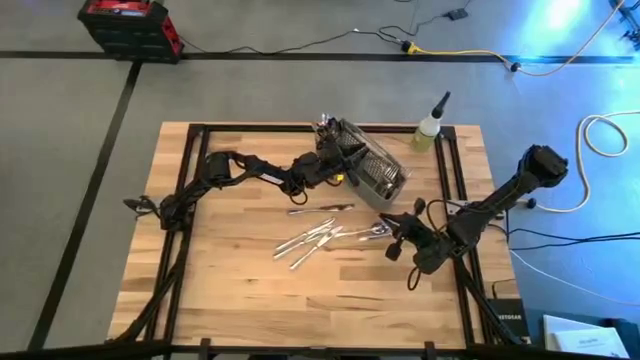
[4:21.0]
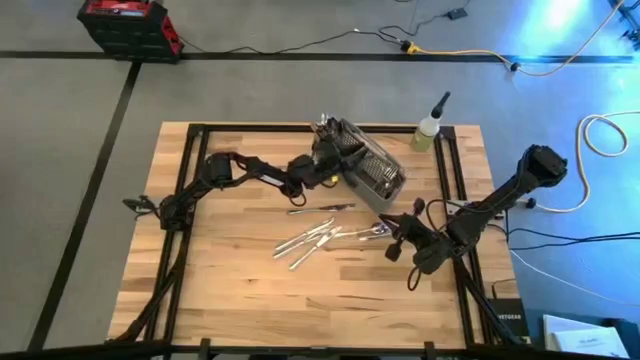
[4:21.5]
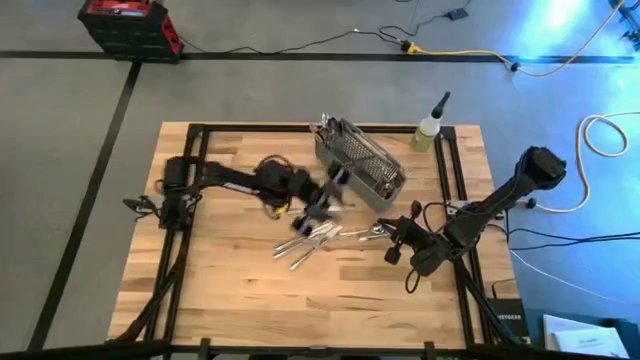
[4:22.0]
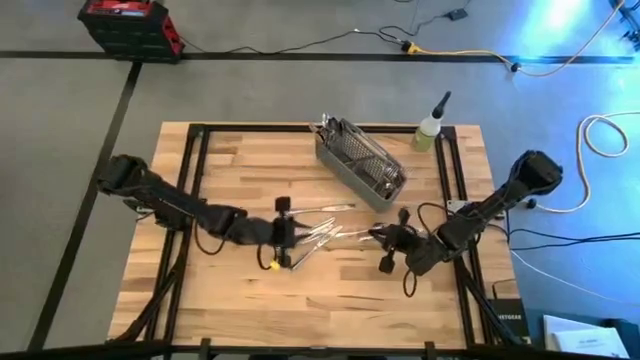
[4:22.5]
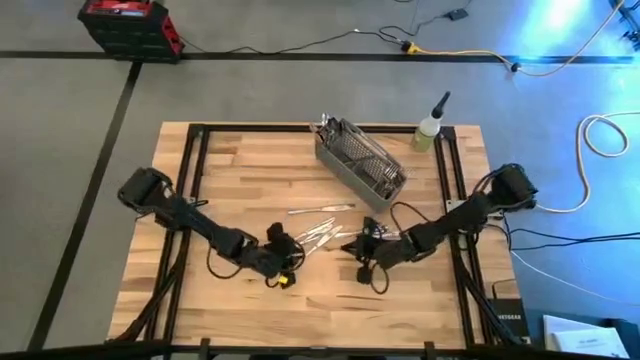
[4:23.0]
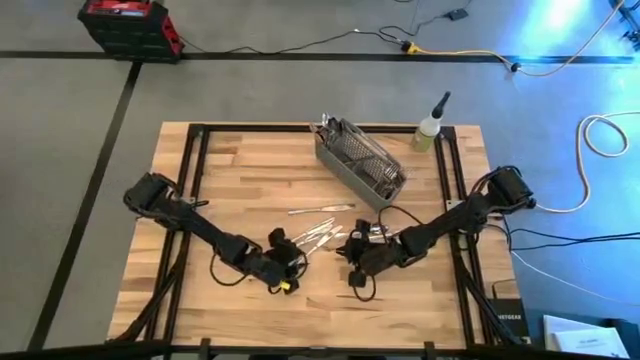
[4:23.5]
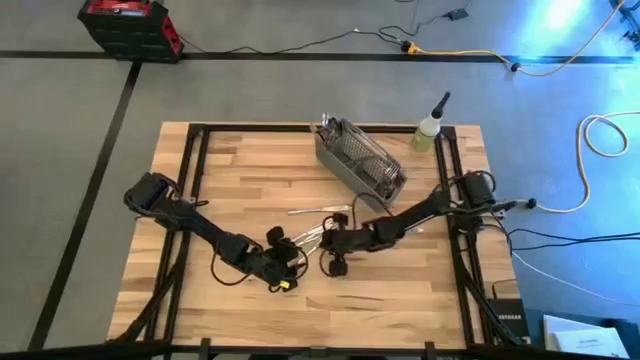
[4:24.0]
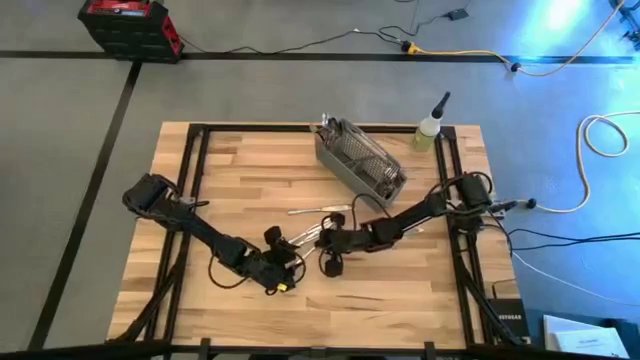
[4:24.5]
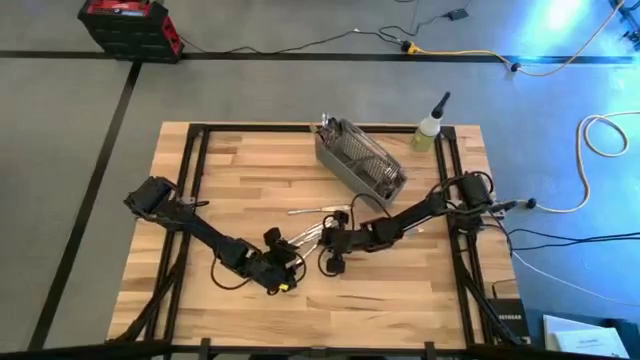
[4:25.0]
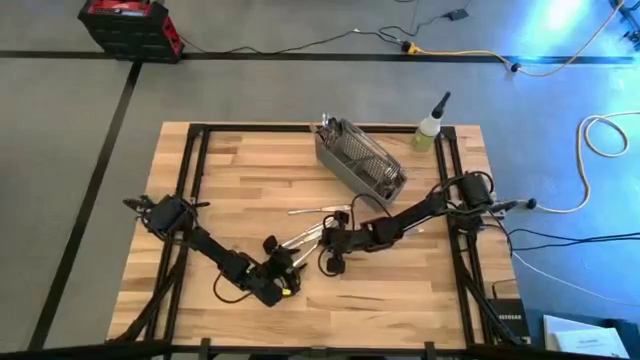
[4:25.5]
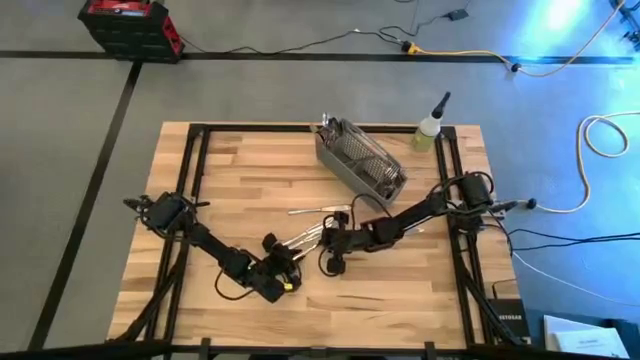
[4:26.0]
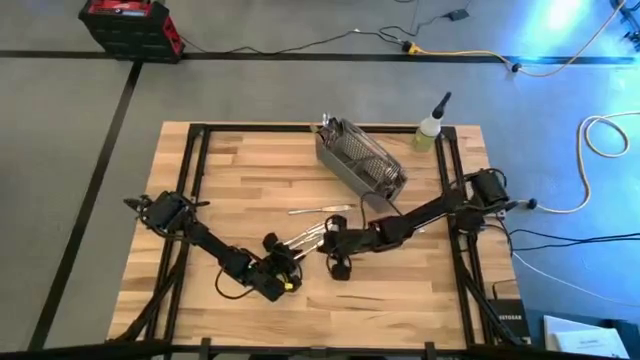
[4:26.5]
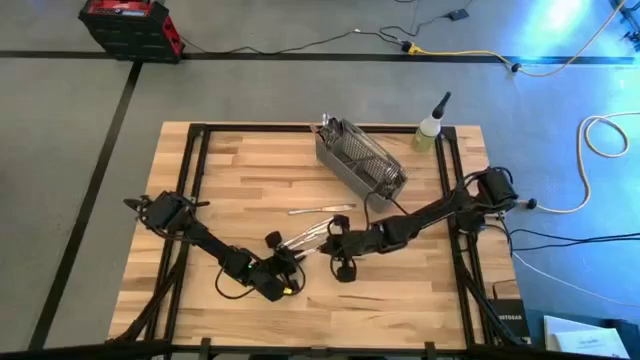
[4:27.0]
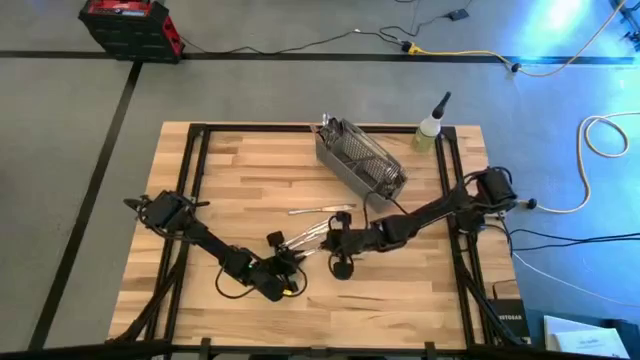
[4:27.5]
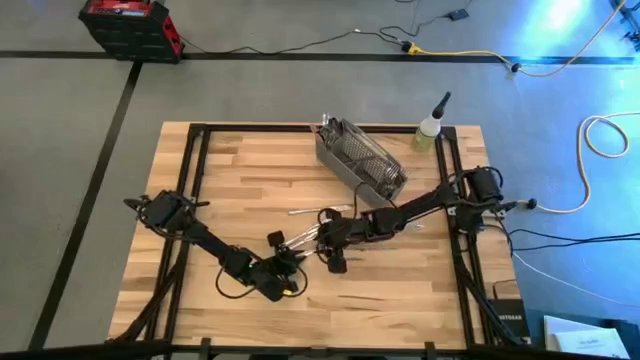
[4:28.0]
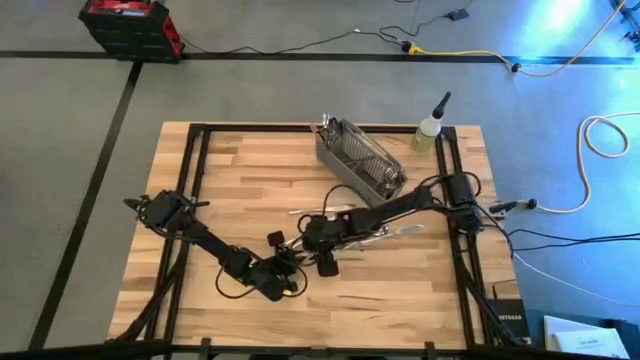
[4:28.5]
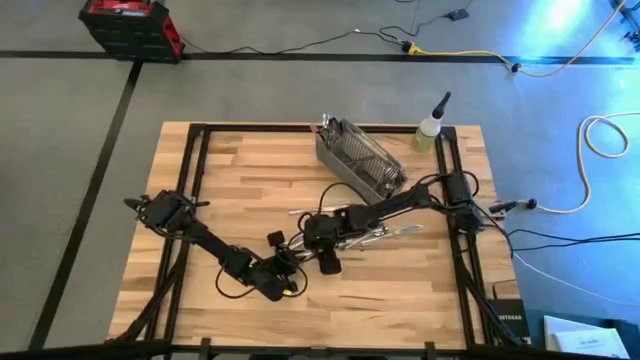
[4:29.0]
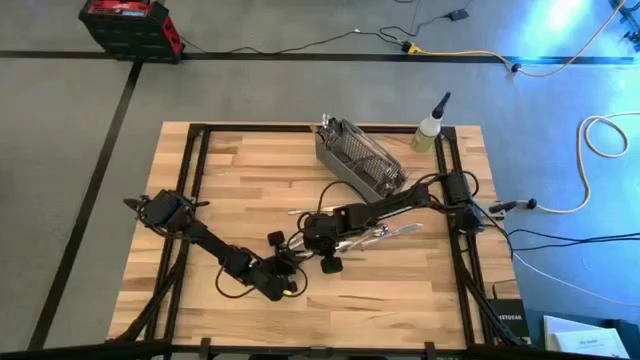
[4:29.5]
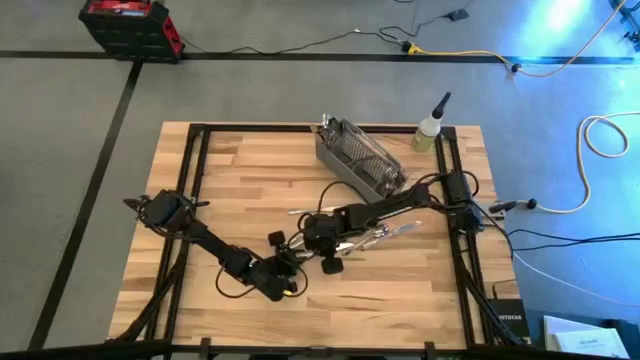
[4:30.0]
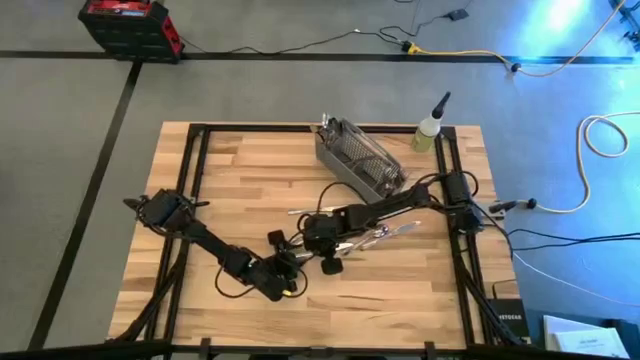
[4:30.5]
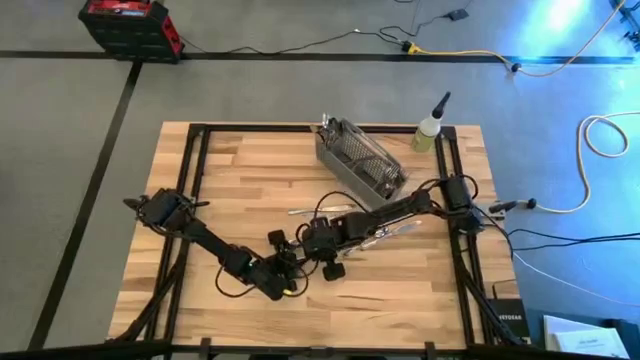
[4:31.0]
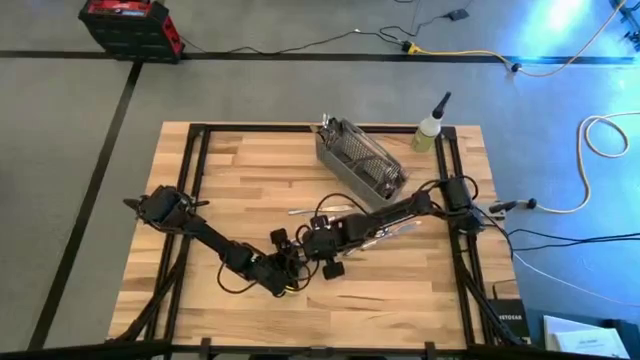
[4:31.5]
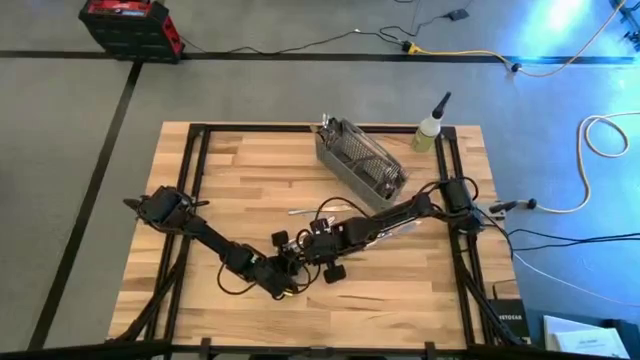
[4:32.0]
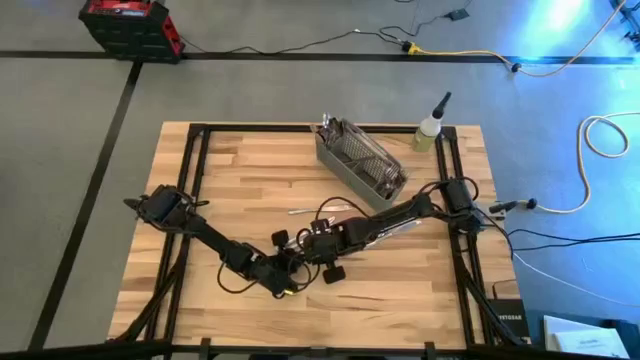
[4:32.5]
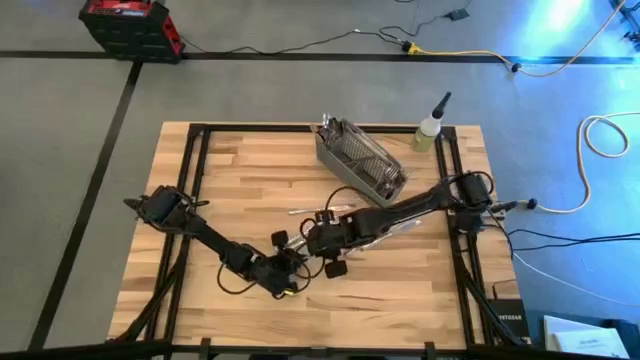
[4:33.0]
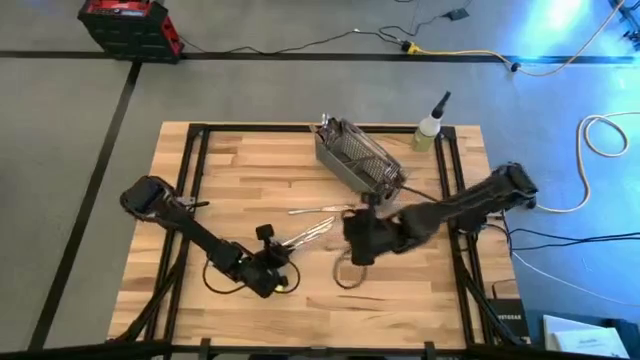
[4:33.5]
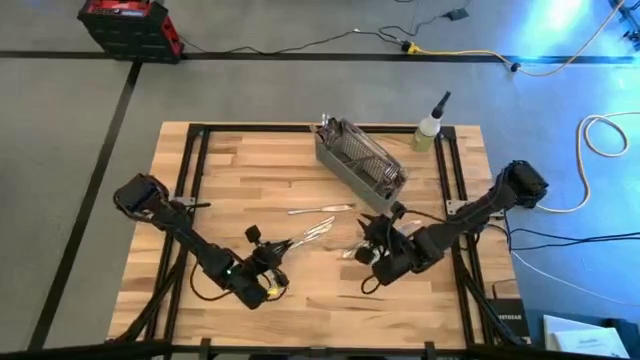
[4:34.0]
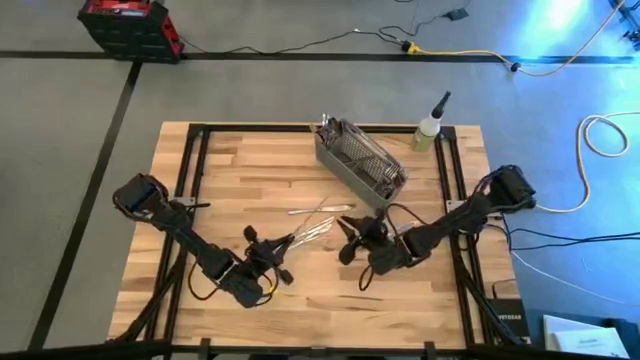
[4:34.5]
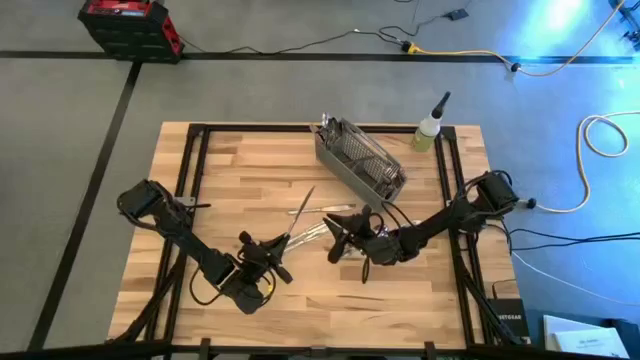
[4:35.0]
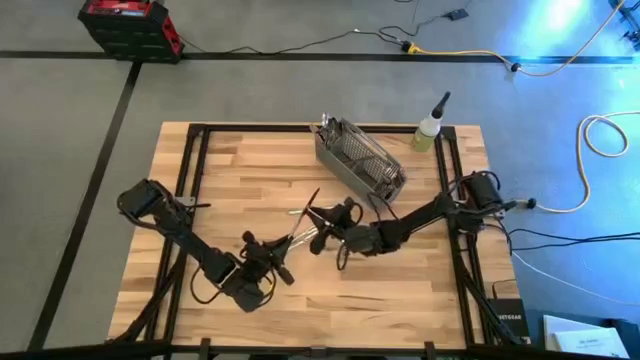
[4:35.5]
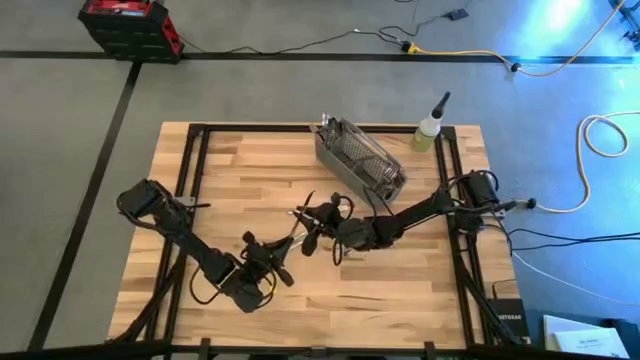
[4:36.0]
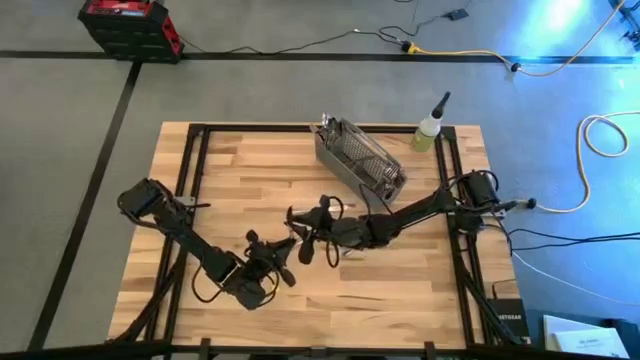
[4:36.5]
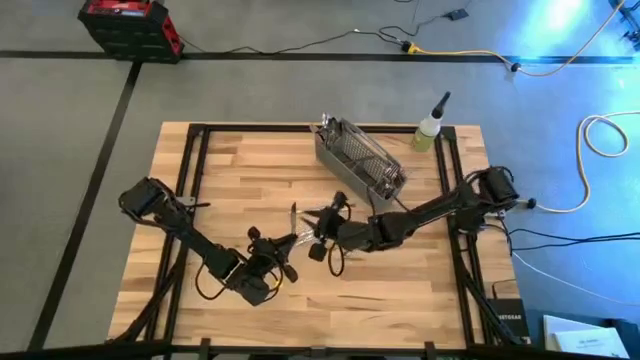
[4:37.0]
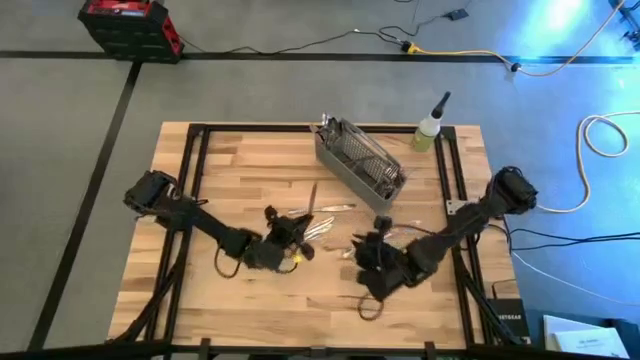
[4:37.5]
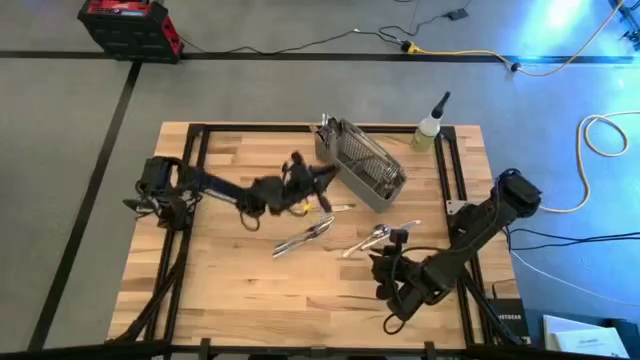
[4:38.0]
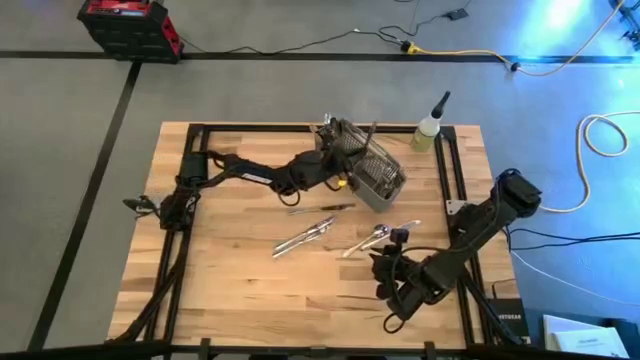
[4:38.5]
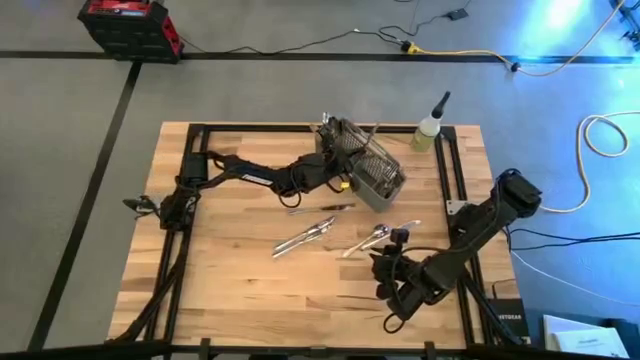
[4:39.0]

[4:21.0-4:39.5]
Task: Sort silverware
Put the silver knife into the gray silverware organizer

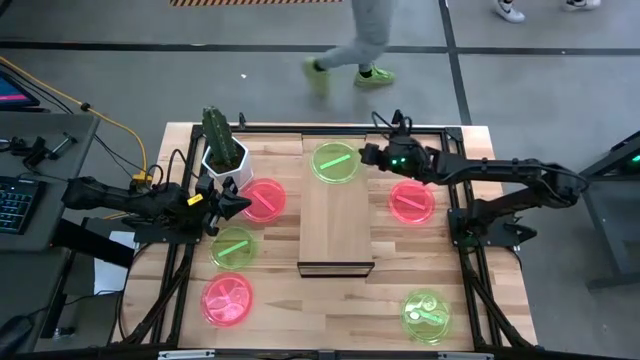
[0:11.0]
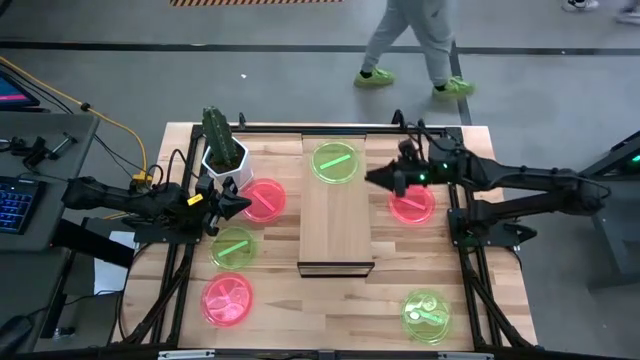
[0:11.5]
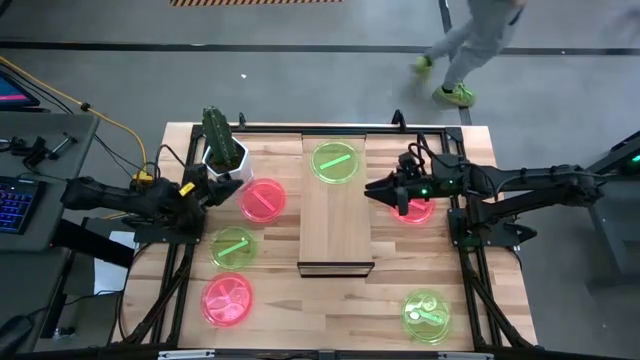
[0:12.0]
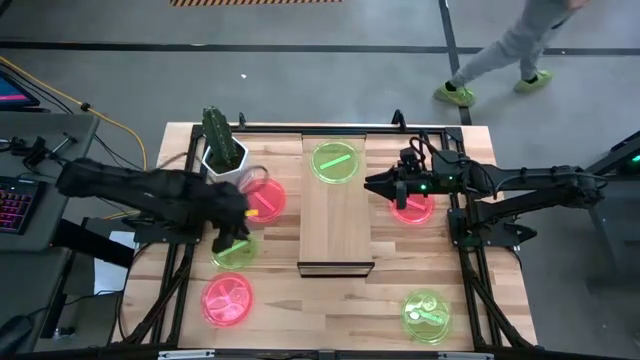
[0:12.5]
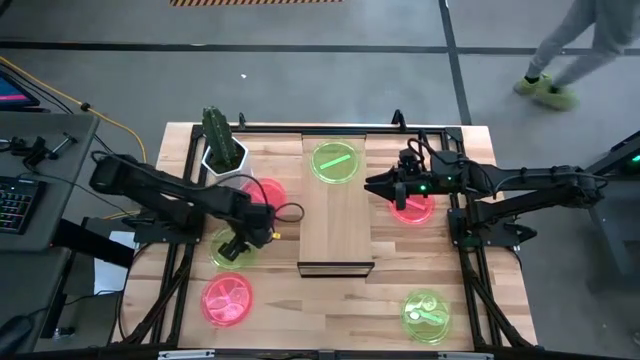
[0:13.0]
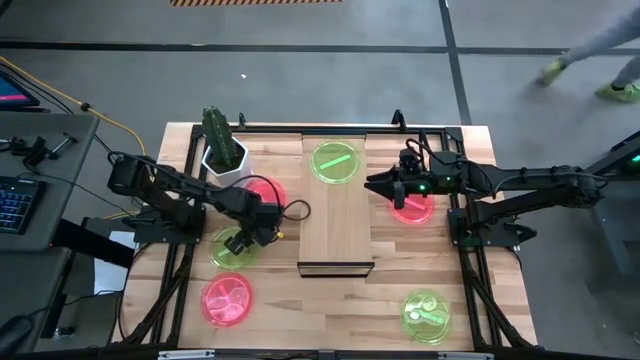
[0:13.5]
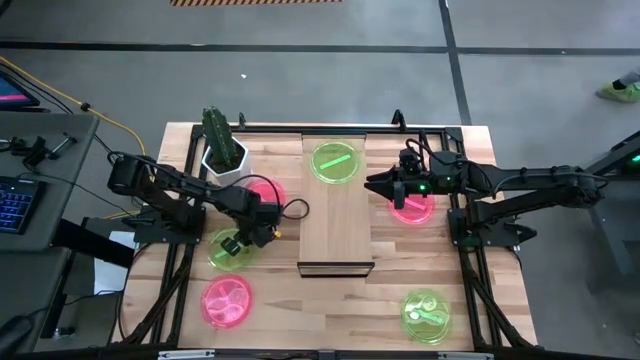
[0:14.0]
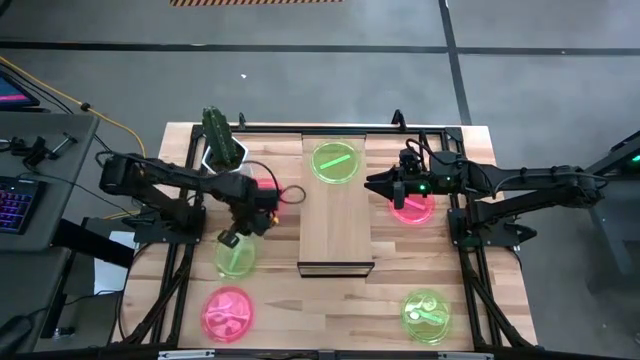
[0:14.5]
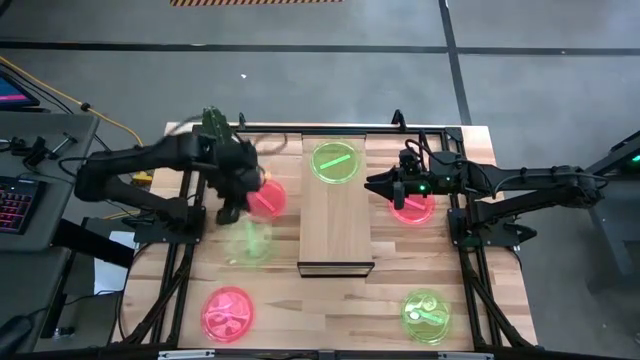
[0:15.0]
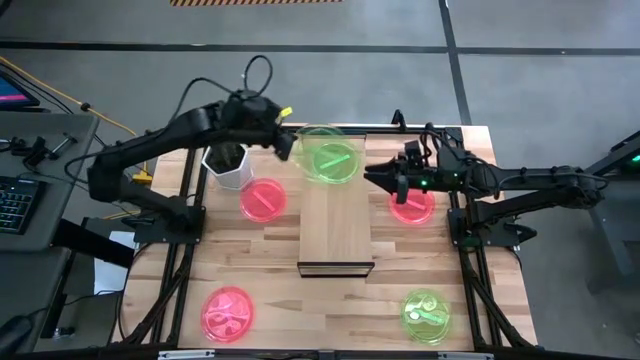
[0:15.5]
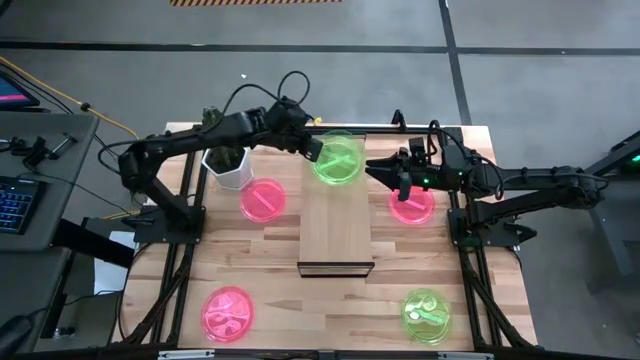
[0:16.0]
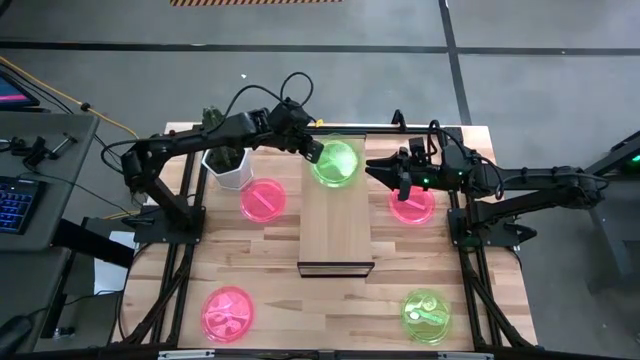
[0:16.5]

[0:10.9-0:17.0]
Task: Place and stack plates onto a shelf
Stack the left green plate on top of the other green plate on the shelf
